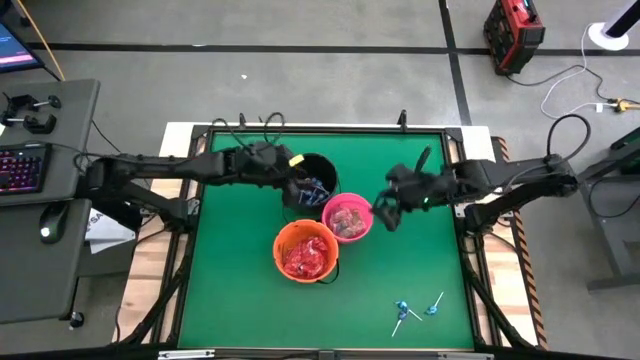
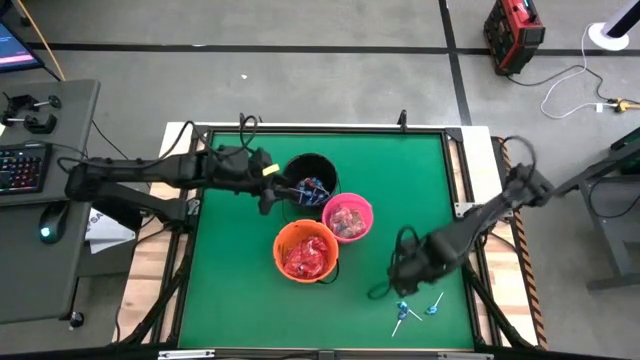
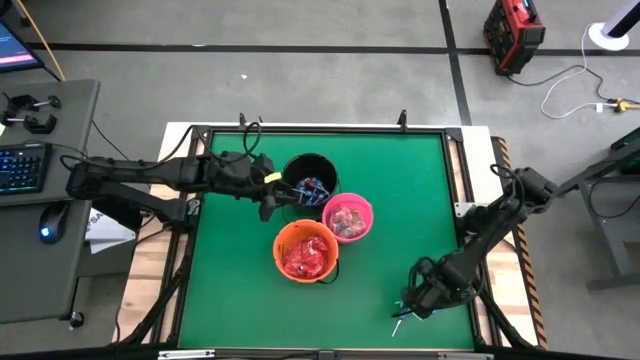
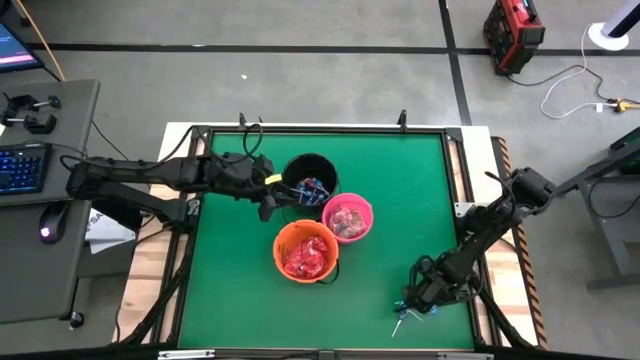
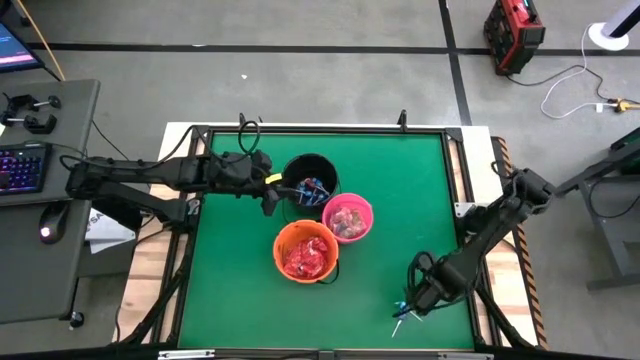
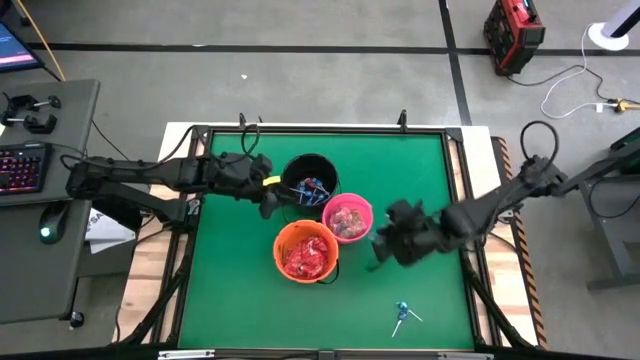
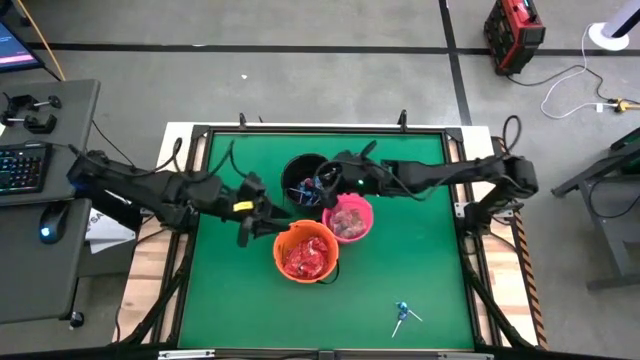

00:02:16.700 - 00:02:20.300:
Task: Sort candy by brand, put in halloween buckets
Put the blue lollipop into the black bucket

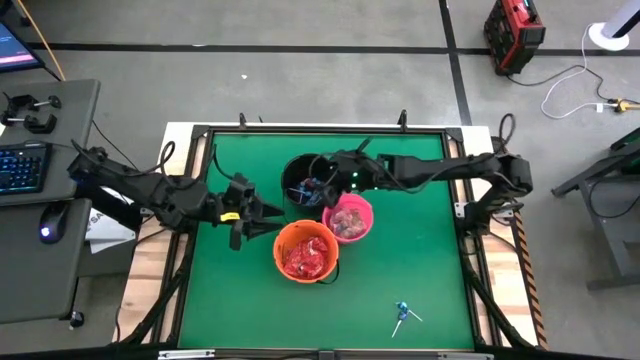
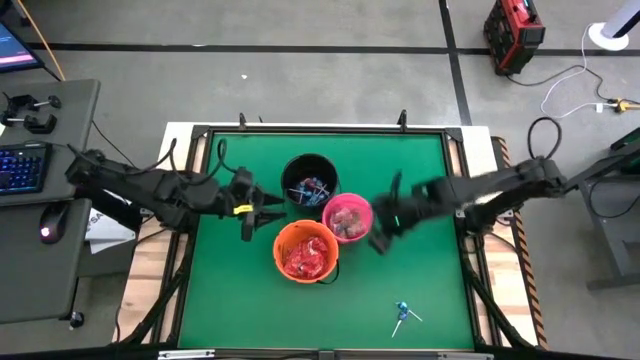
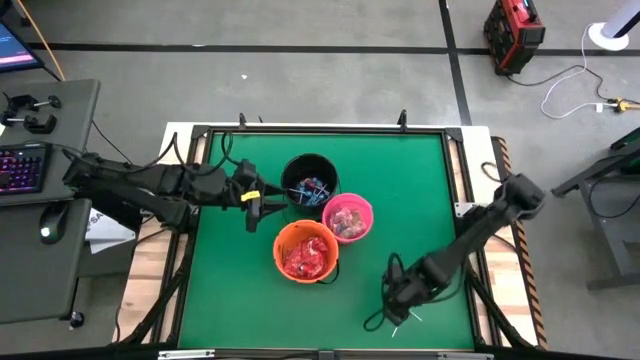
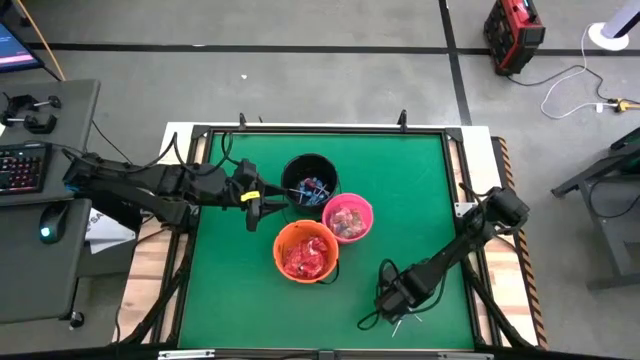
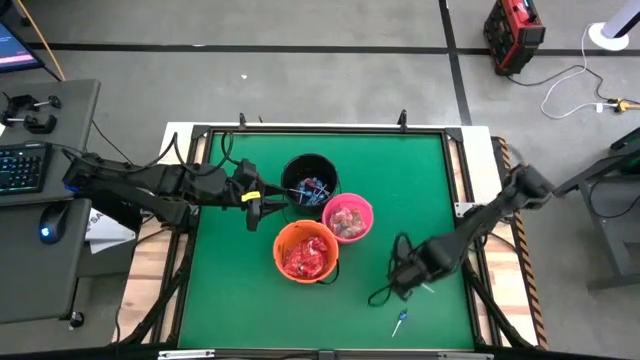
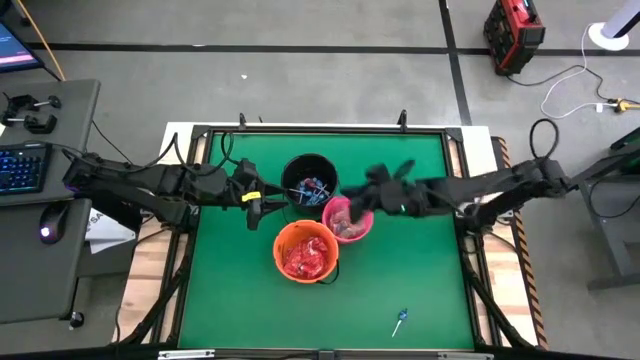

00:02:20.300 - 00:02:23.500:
Put the blue lollipop into the black bucket

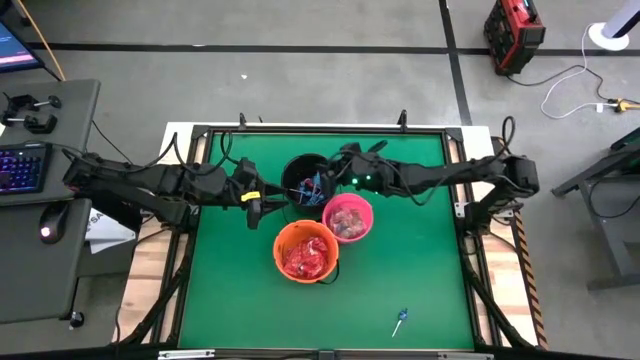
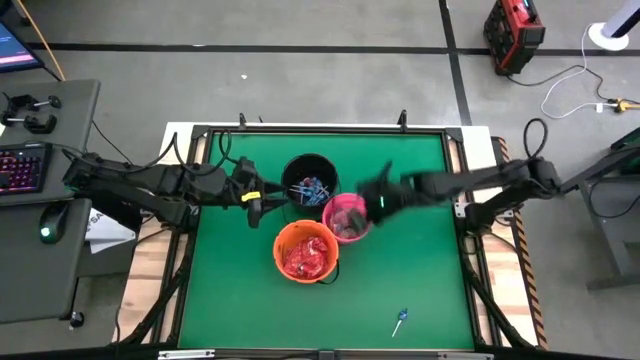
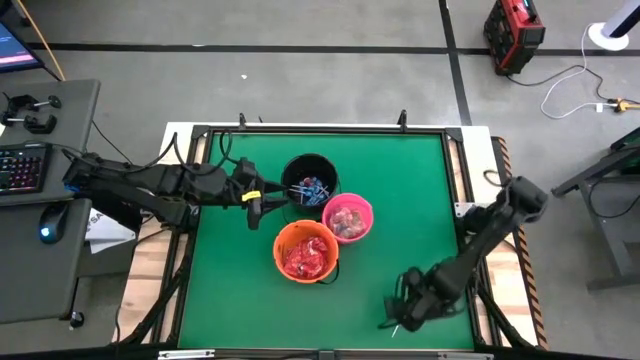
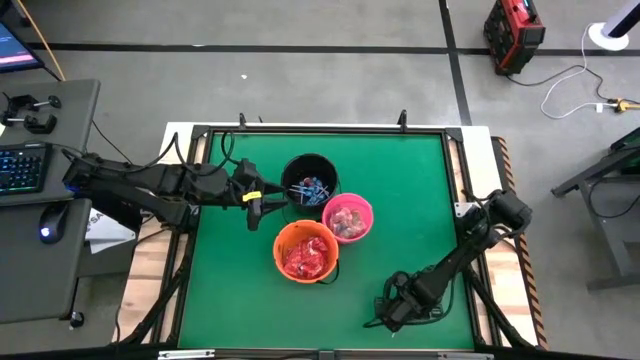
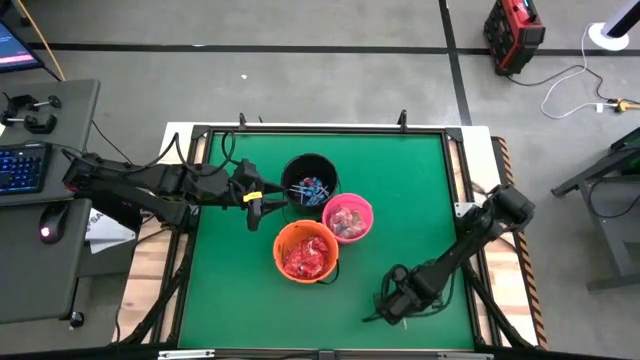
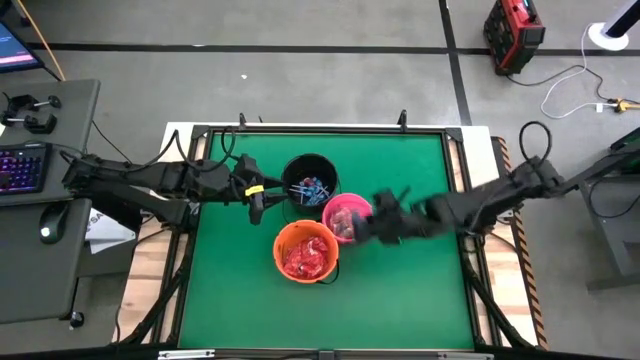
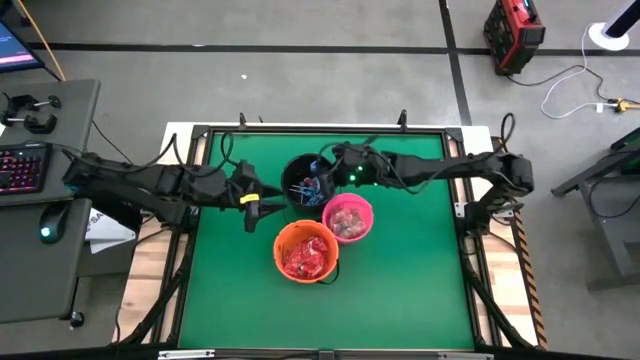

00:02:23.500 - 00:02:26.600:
Put the blue lollipop into the black bucket

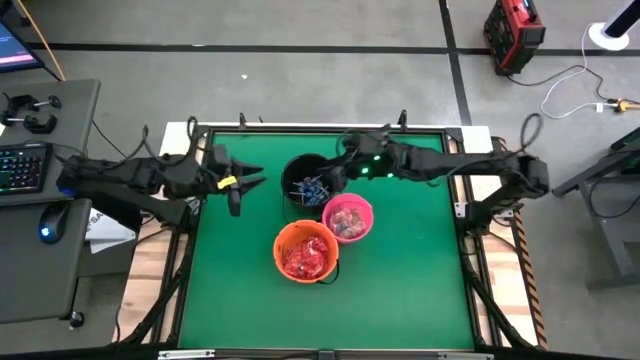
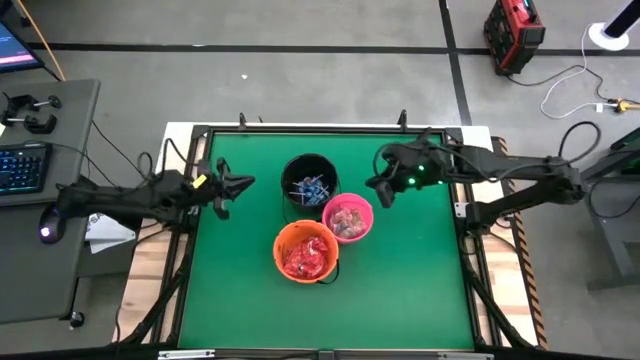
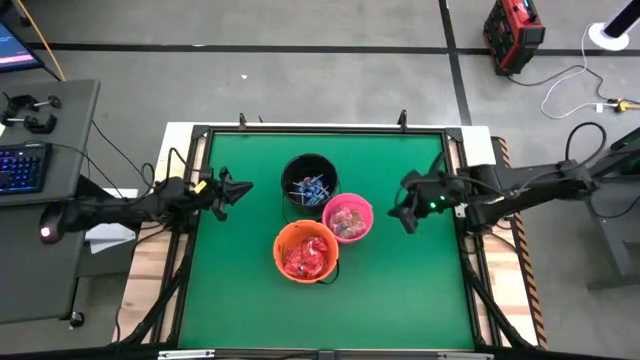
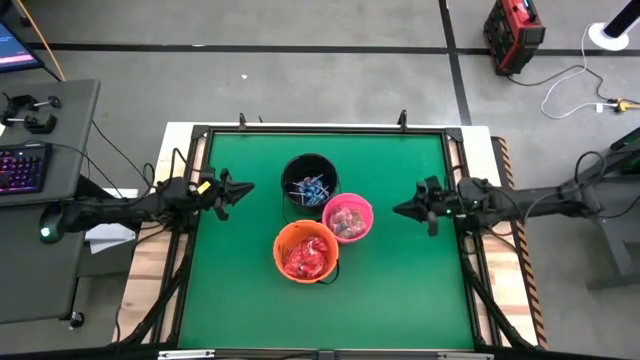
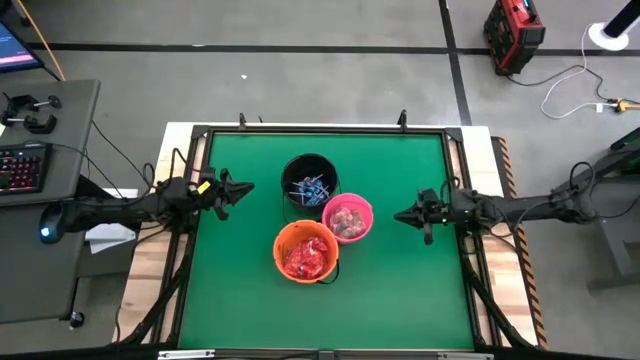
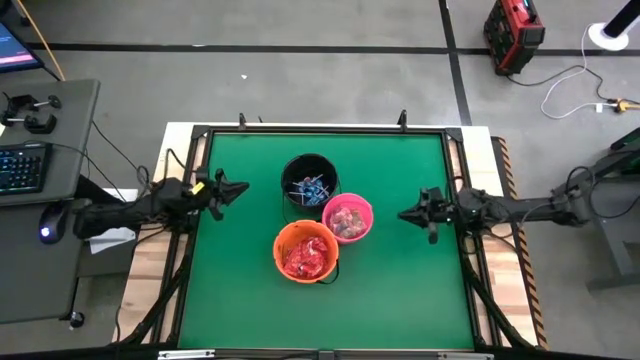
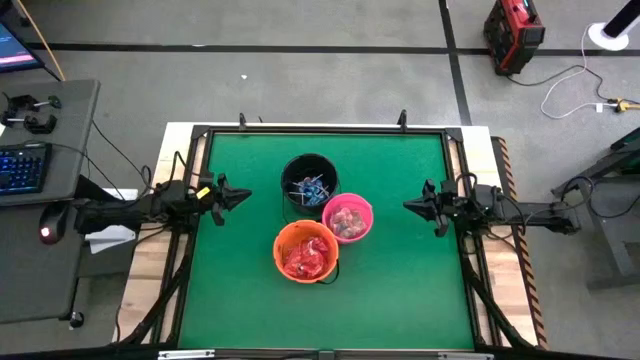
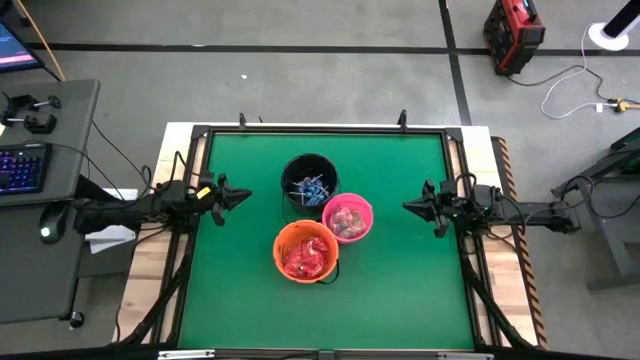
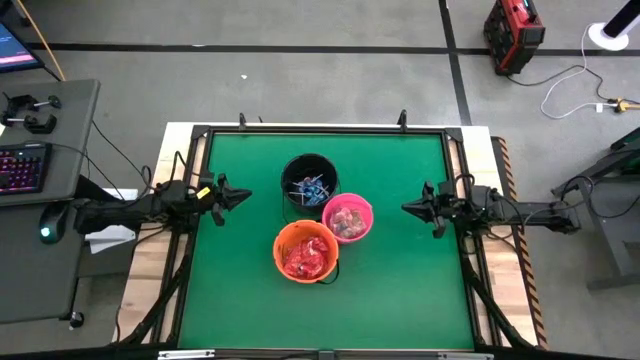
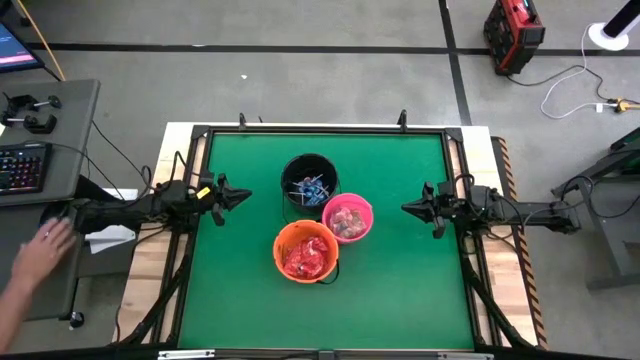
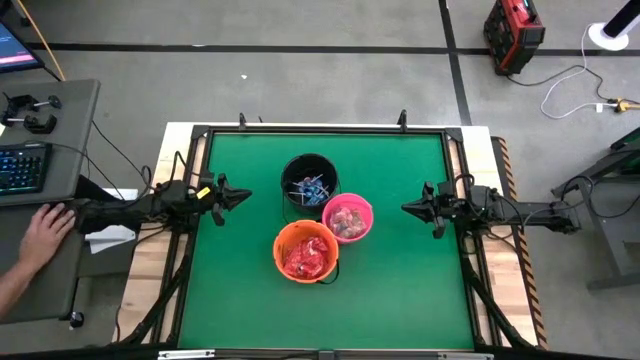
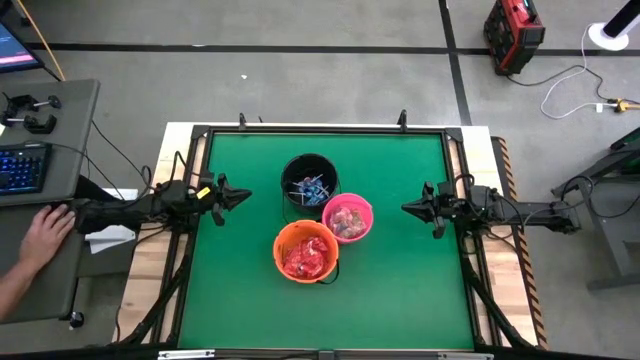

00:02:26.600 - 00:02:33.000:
Return to Home Position

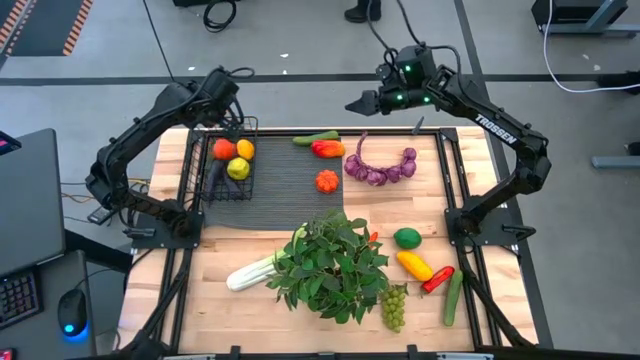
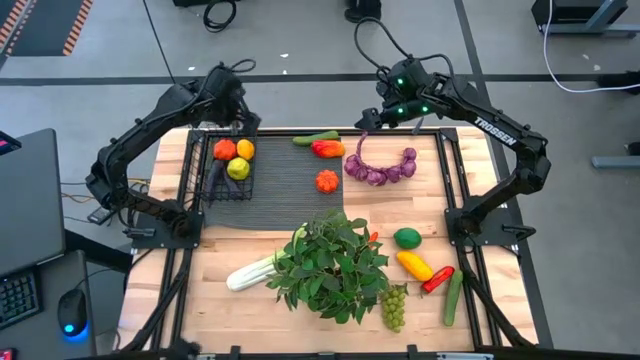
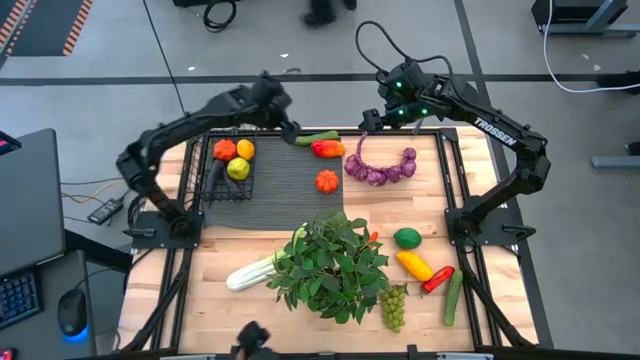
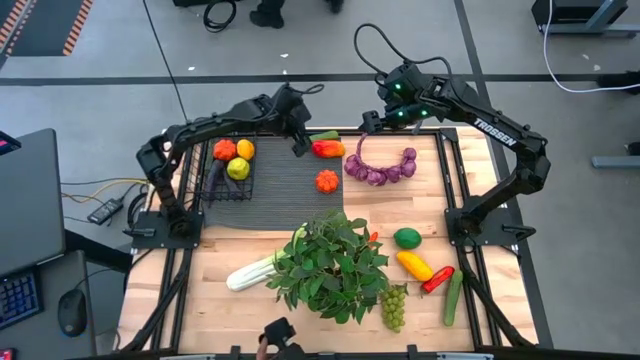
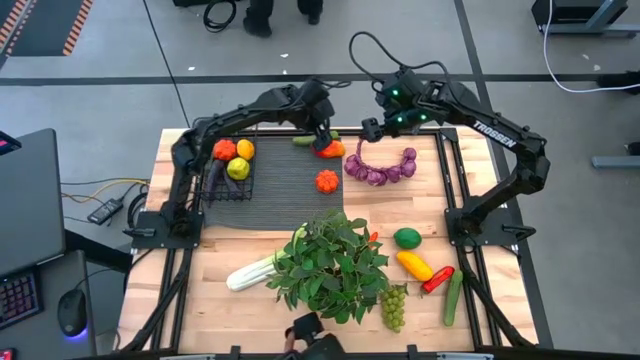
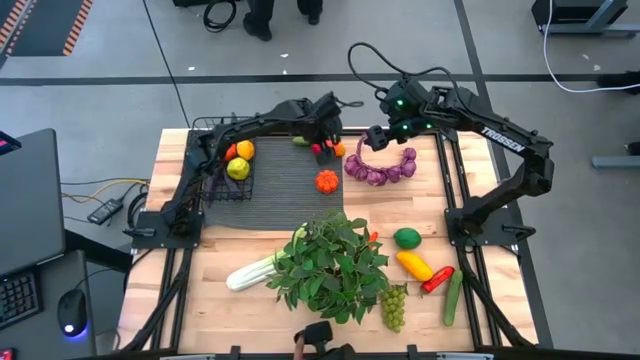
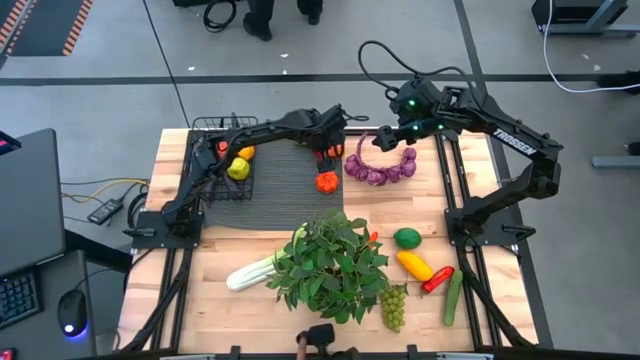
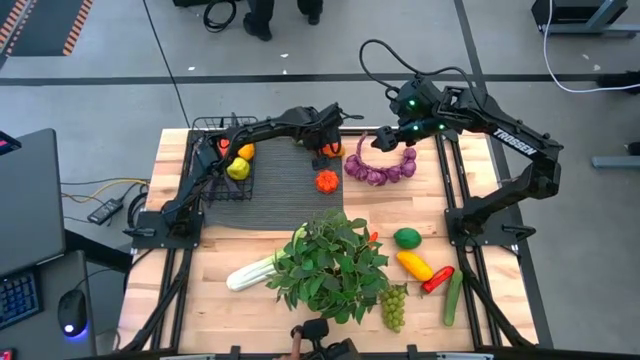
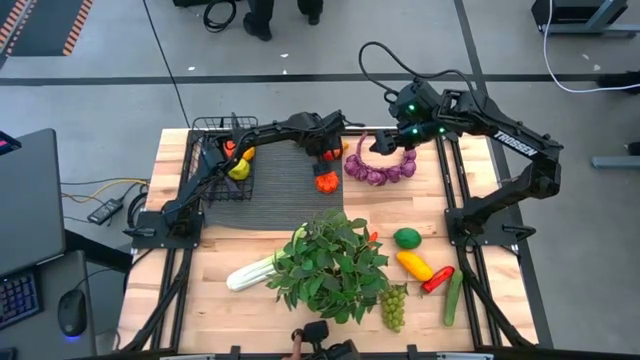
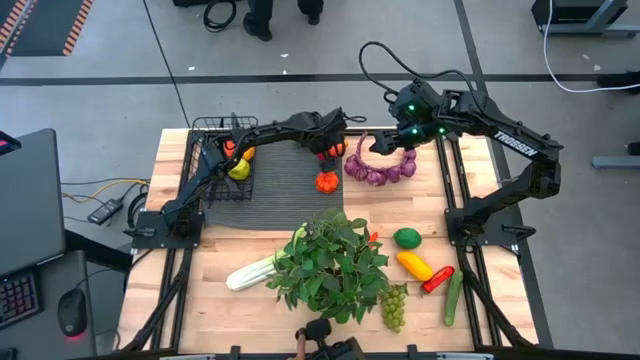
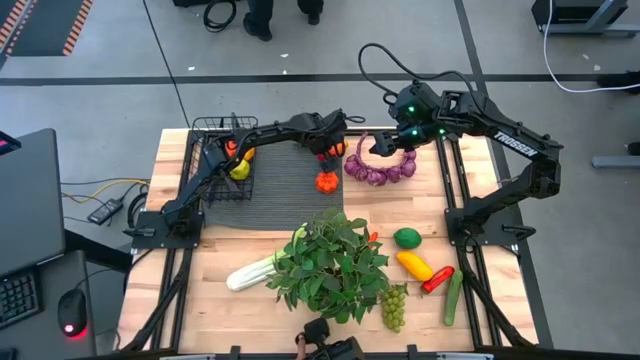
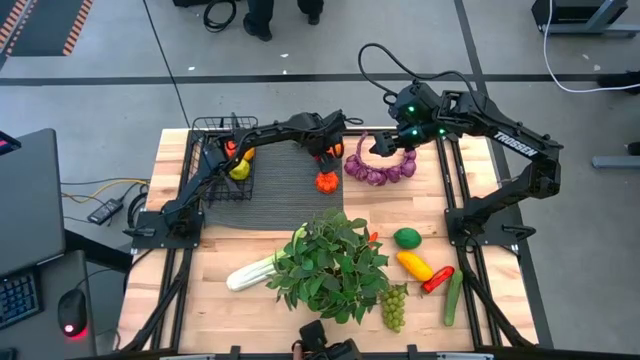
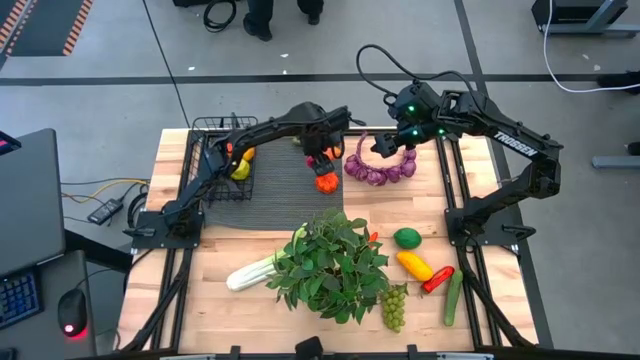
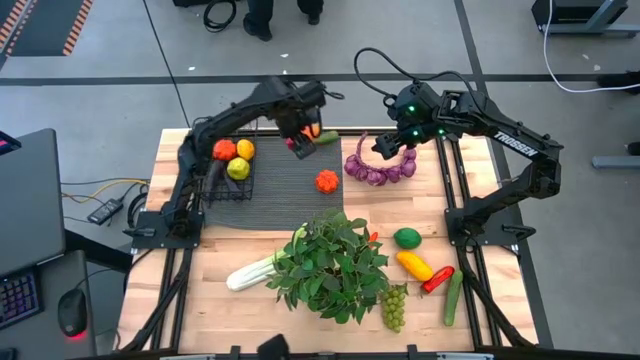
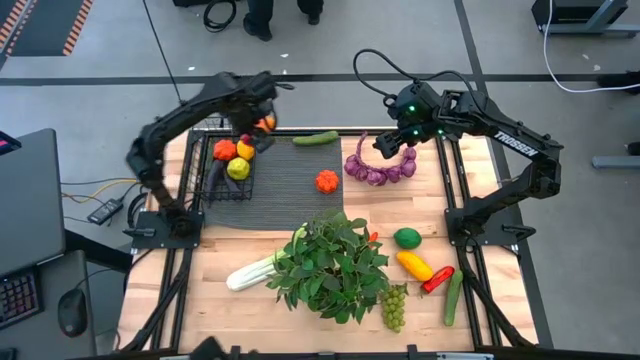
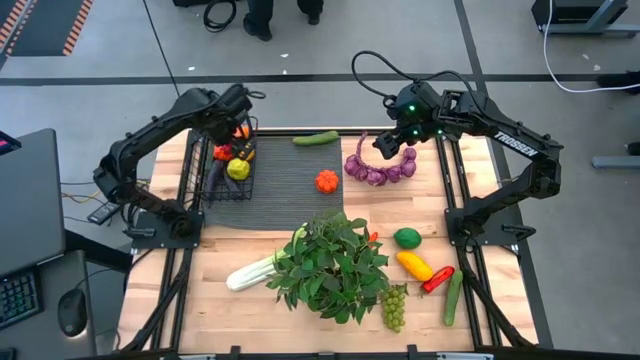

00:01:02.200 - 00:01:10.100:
Task: Build produce basket
Put the orange mango into the wire basket
